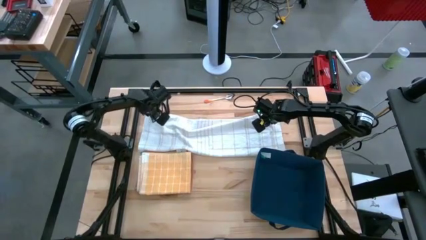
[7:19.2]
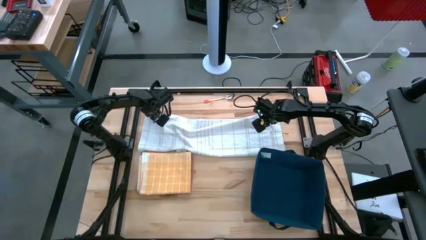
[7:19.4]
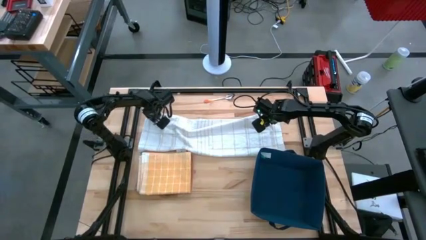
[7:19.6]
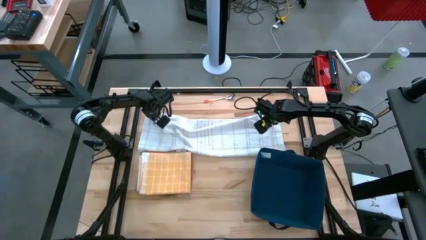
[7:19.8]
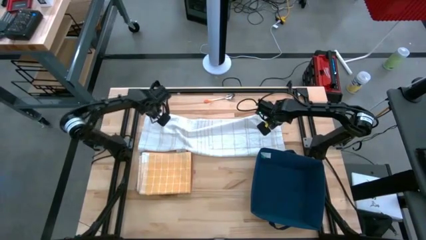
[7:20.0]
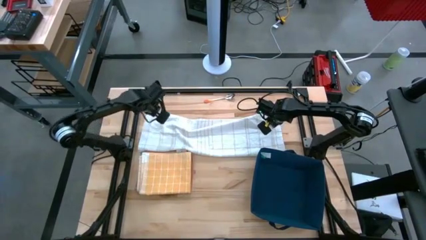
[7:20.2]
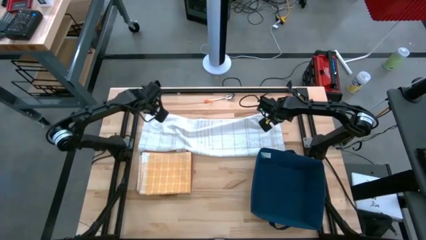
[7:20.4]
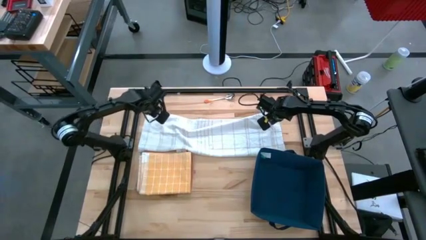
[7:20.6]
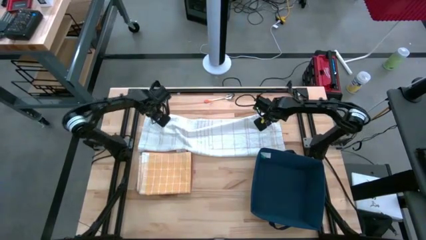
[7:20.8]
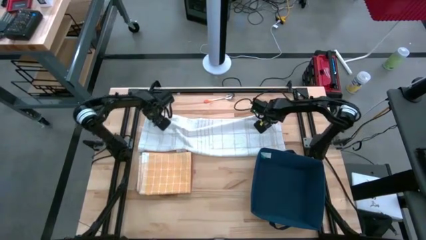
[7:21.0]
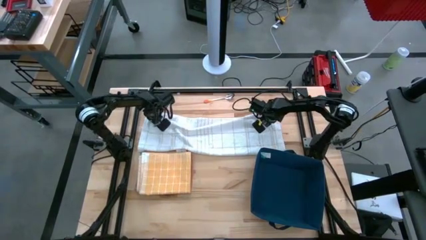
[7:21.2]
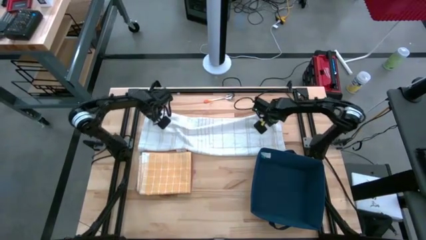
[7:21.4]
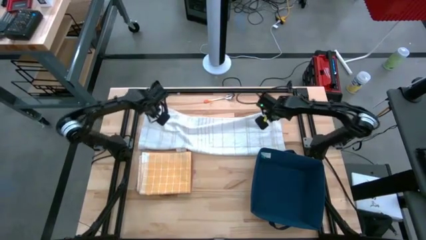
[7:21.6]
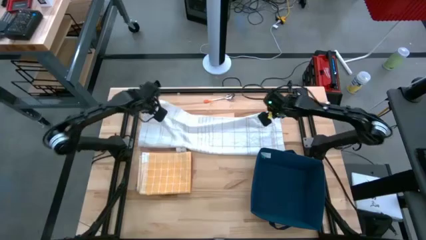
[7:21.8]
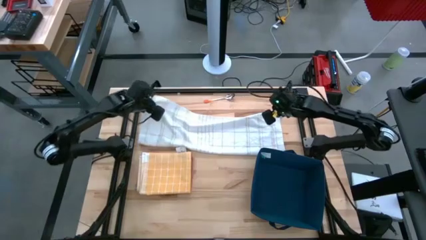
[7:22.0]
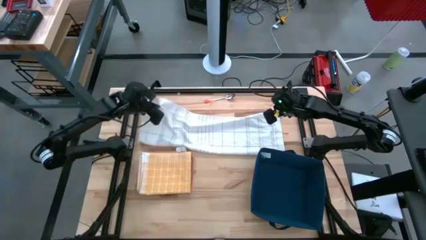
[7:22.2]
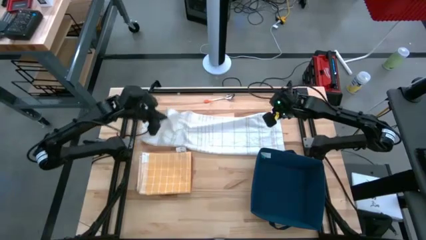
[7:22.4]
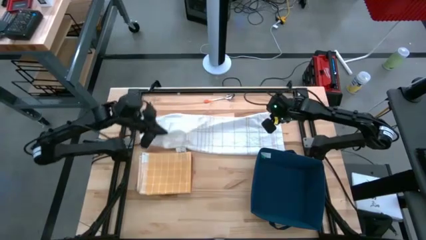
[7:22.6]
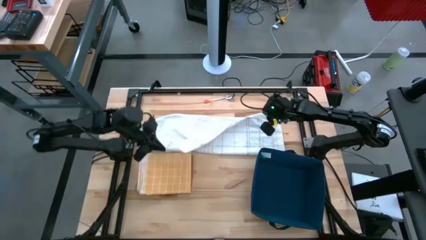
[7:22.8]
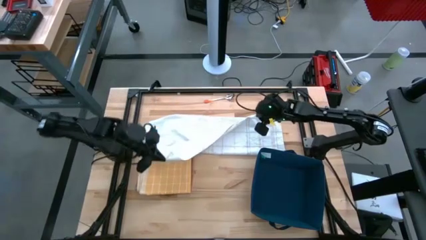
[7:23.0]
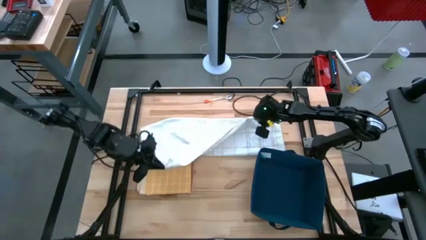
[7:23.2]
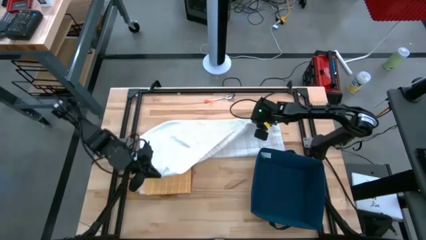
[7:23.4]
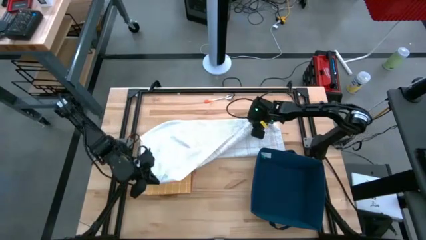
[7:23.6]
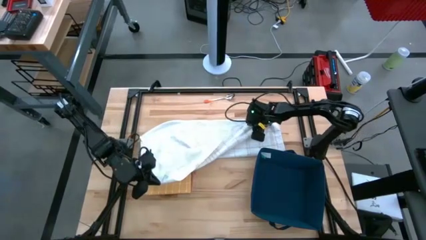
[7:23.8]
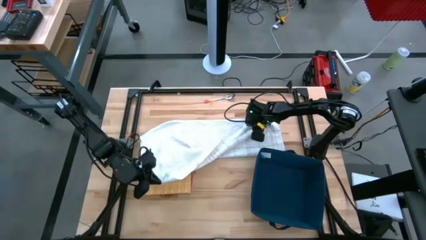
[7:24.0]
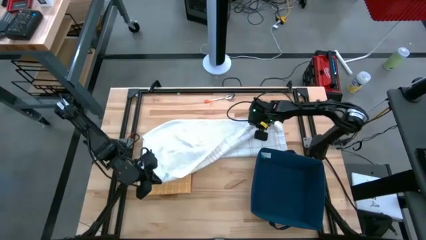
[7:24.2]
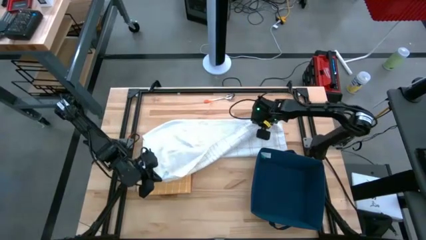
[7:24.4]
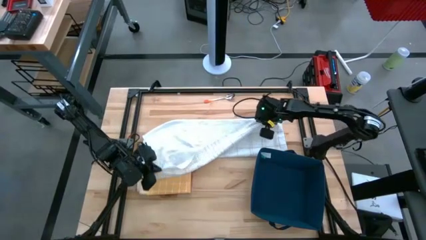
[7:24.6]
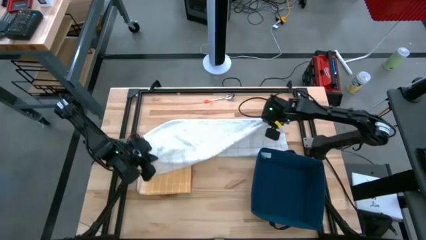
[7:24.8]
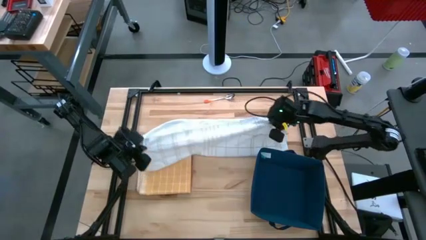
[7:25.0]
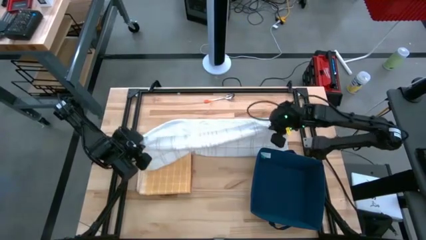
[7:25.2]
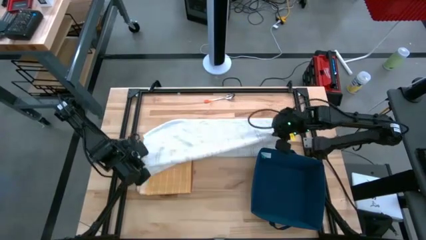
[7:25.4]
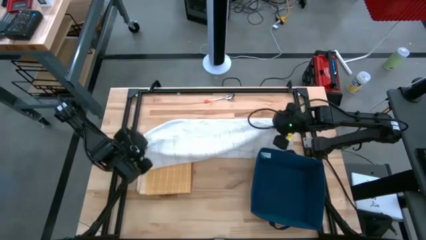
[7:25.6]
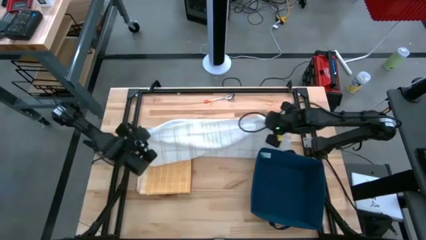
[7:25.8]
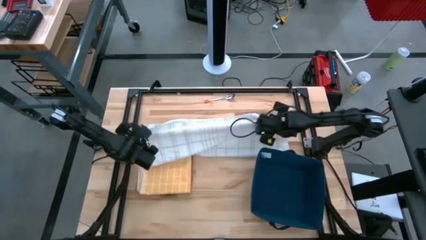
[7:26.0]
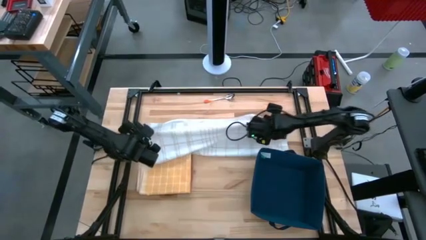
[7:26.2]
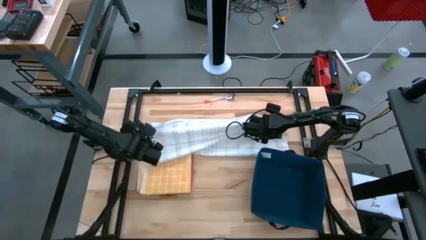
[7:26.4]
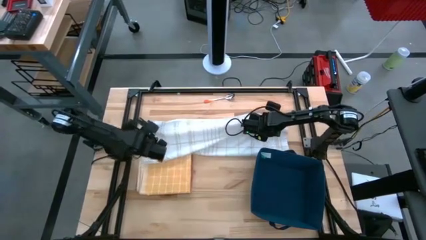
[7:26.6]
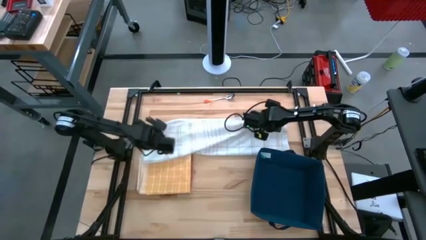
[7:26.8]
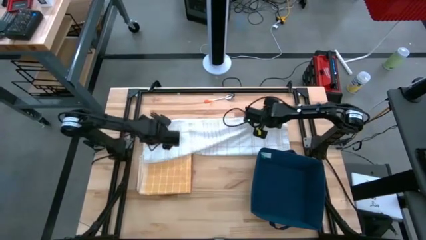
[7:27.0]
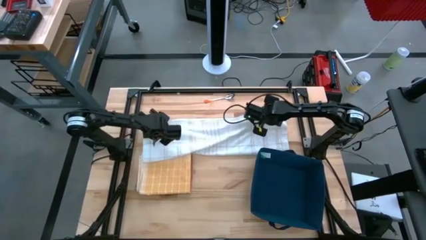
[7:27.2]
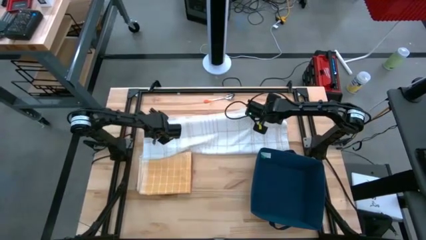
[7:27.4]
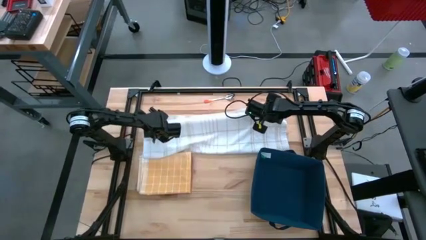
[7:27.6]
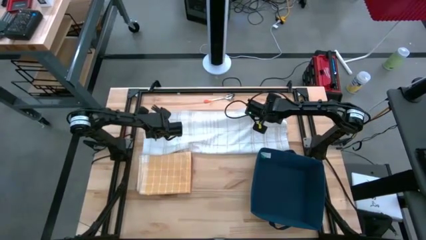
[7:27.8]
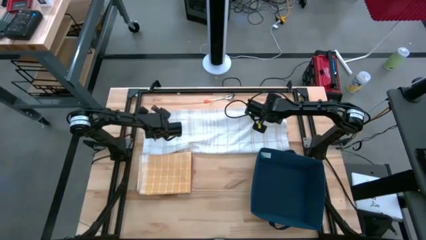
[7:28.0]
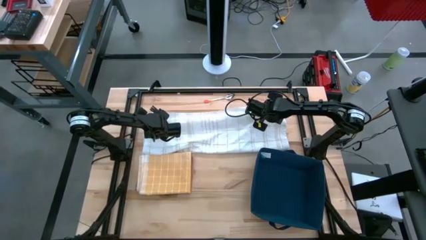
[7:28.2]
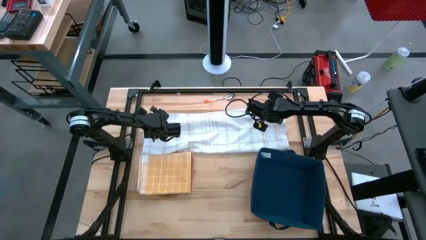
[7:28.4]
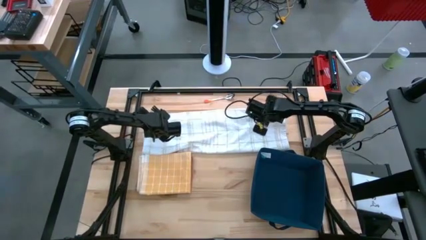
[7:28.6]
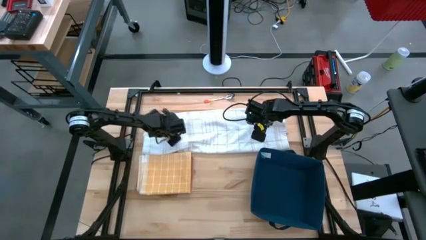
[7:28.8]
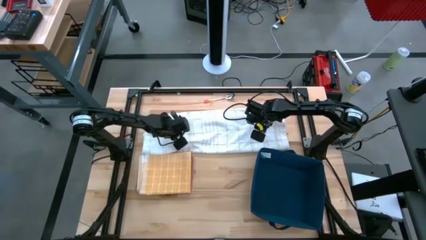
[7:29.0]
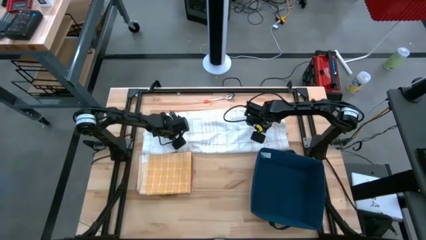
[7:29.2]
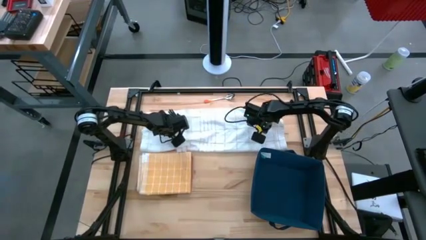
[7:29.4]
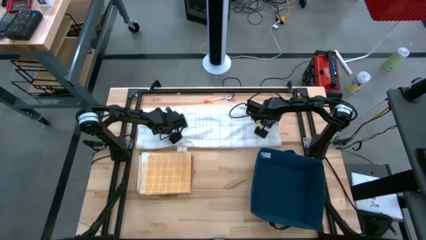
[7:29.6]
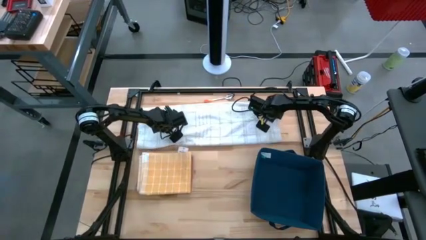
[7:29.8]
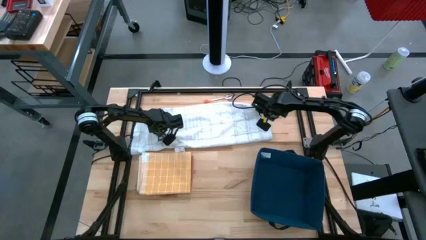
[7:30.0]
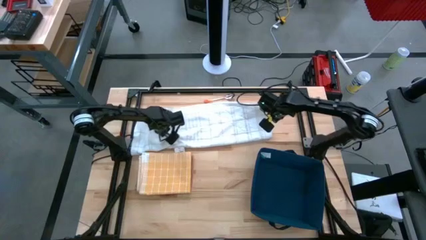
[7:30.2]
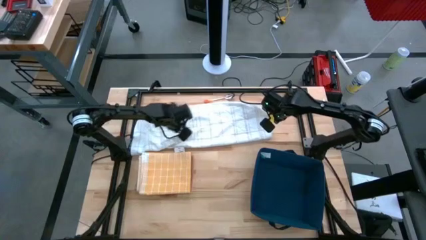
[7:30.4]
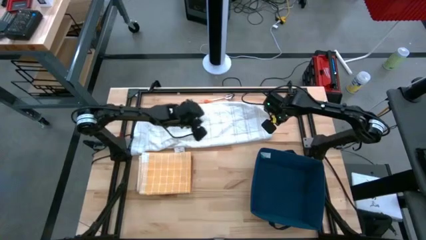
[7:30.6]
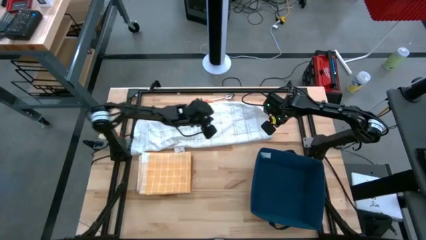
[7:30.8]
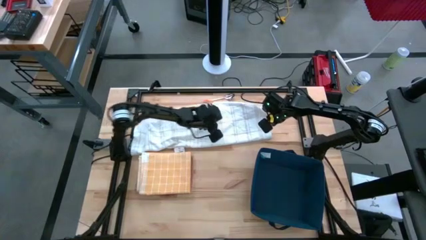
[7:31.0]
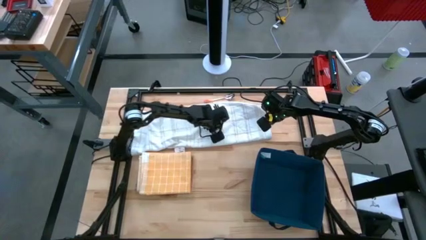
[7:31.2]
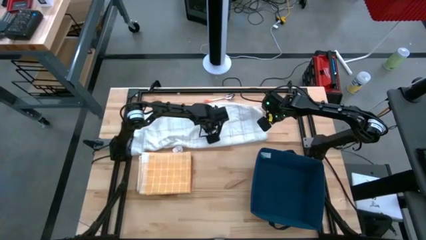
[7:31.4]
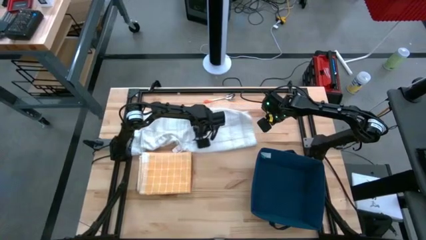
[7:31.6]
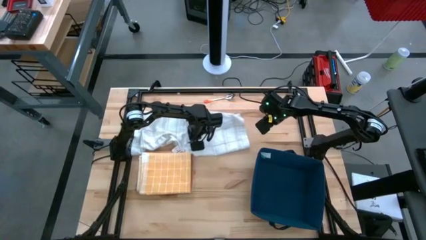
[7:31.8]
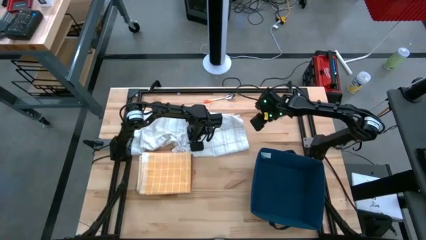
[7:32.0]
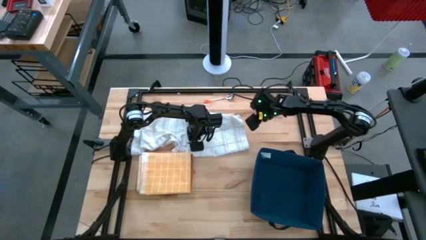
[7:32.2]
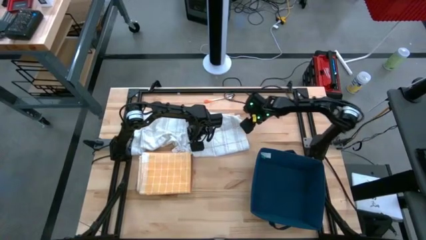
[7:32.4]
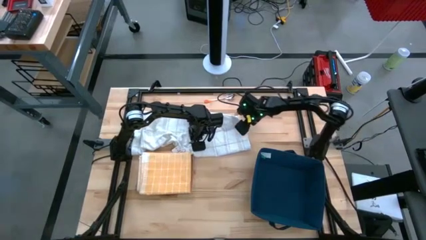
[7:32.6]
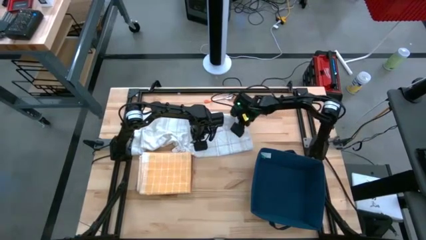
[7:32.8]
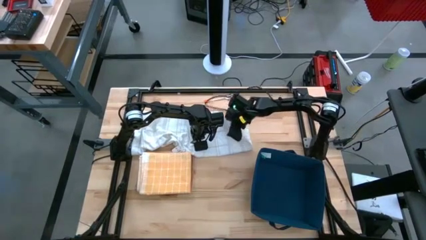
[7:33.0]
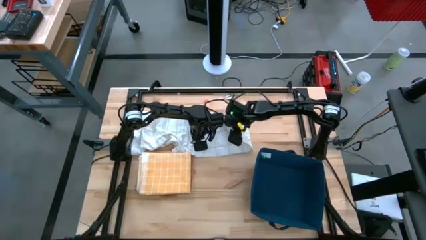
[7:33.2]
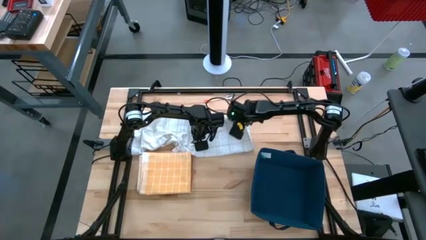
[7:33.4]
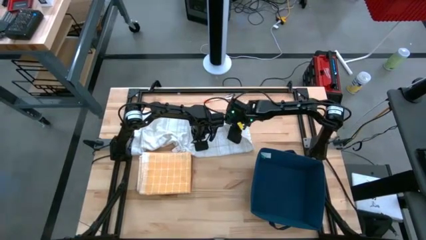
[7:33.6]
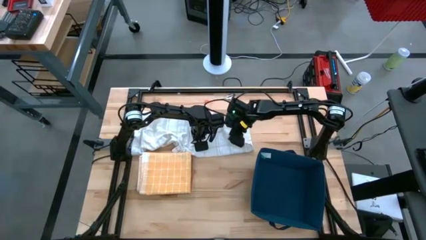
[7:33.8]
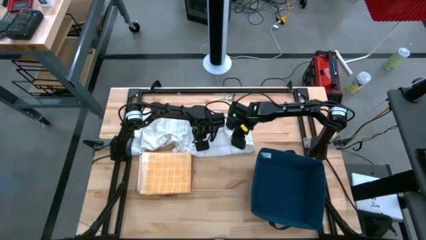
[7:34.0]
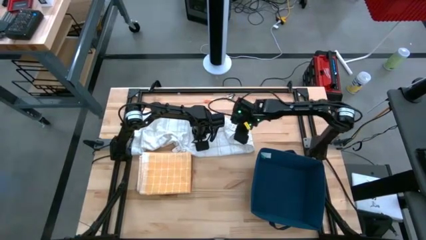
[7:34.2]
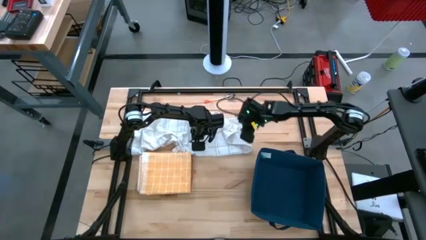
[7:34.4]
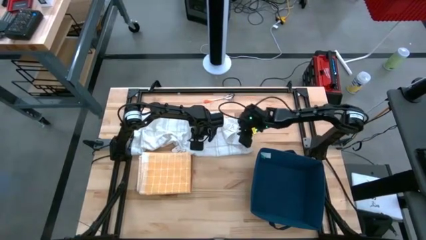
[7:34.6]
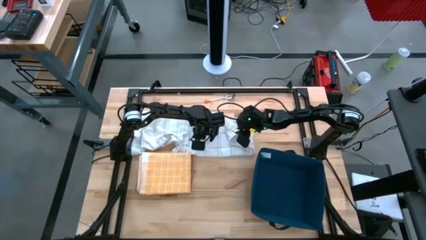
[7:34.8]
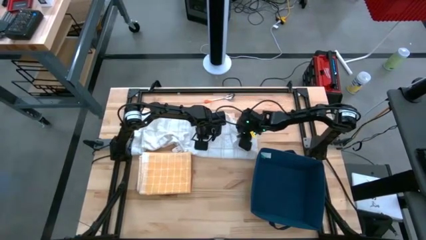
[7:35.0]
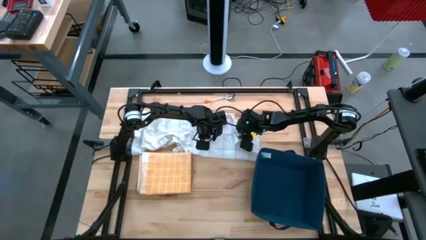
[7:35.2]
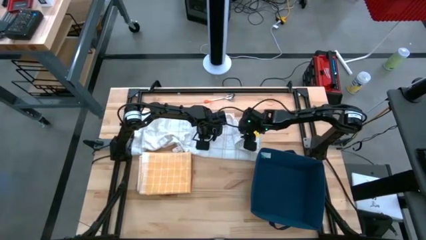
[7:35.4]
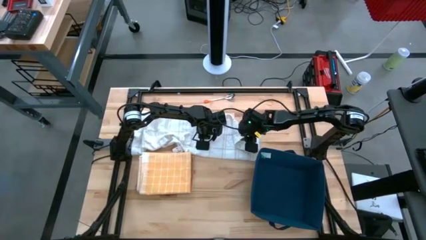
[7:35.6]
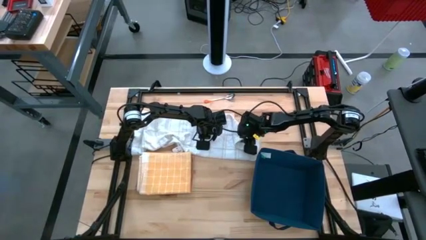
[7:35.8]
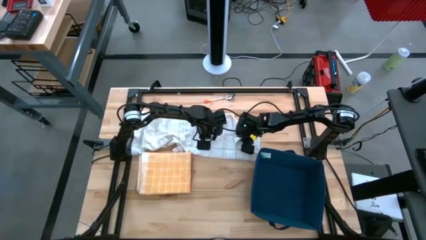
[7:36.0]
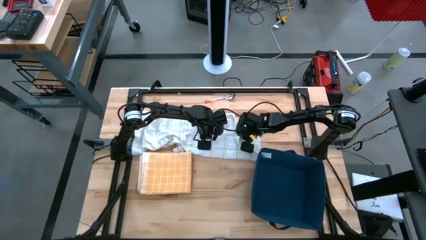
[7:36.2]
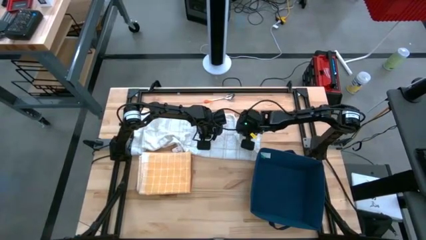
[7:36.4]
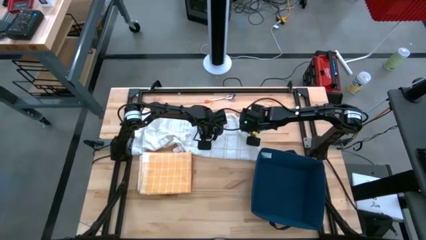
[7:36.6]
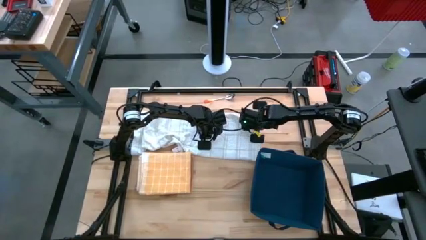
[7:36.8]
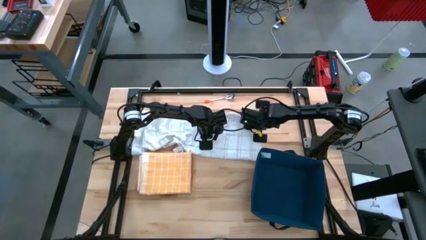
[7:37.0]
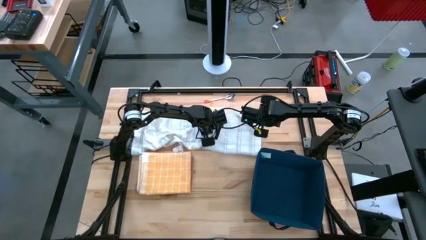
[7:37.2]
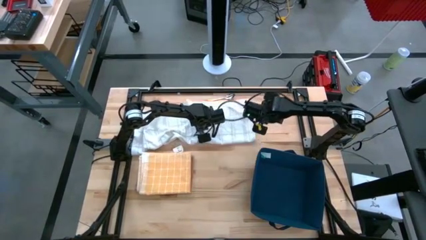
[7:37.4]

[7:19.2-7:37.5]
Task: Fold towel
Fold the white towel
